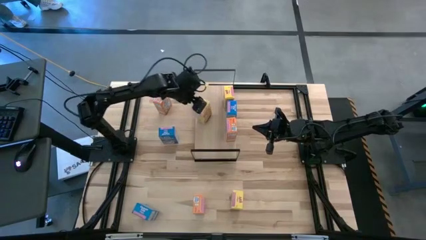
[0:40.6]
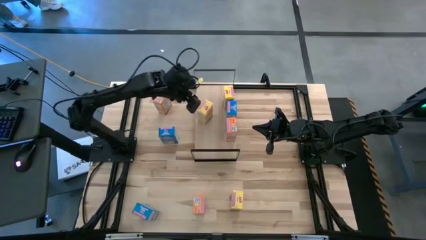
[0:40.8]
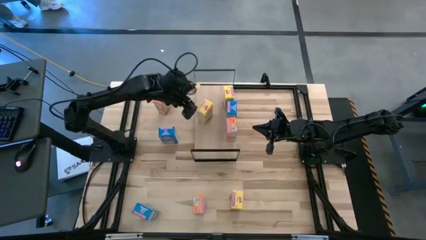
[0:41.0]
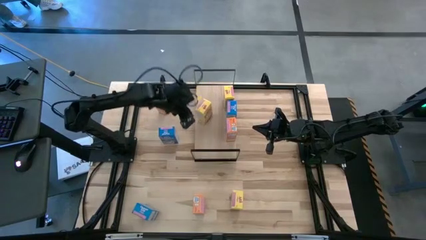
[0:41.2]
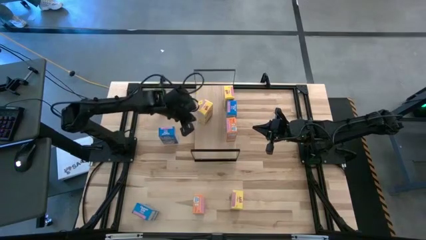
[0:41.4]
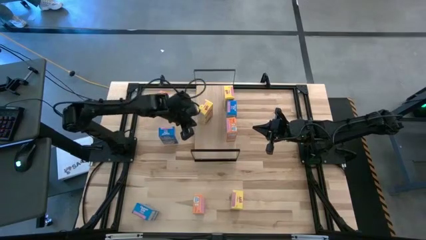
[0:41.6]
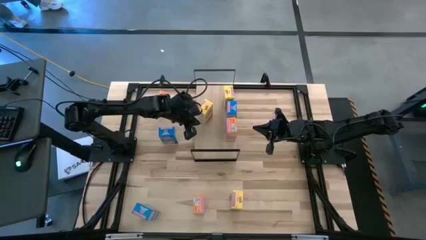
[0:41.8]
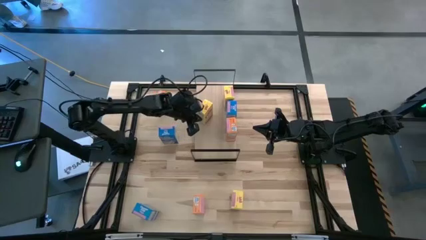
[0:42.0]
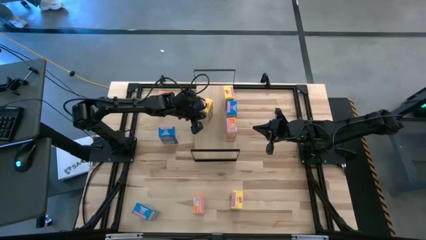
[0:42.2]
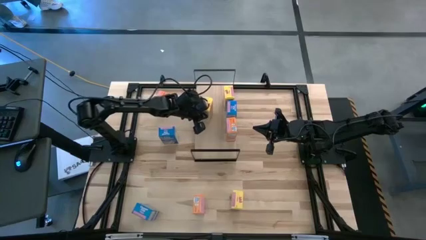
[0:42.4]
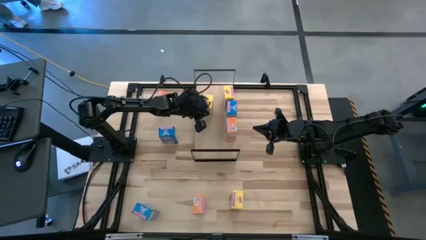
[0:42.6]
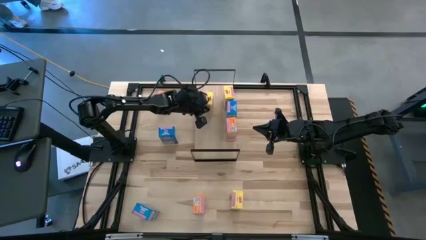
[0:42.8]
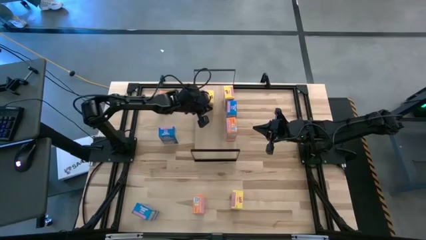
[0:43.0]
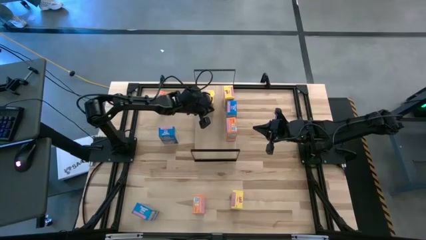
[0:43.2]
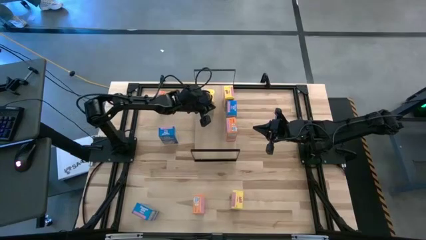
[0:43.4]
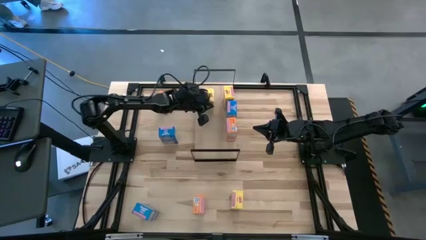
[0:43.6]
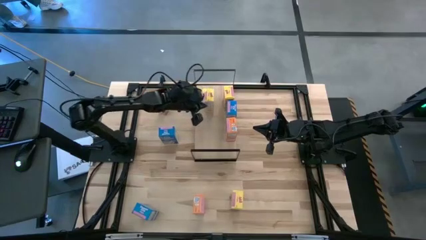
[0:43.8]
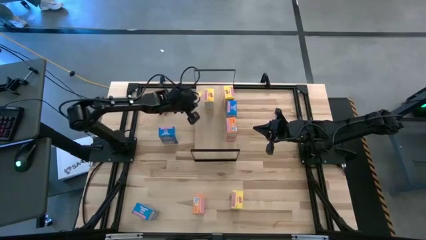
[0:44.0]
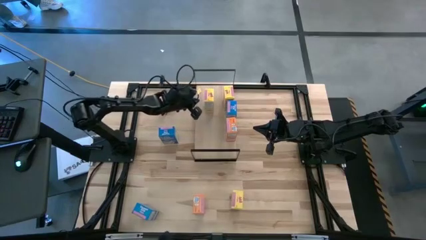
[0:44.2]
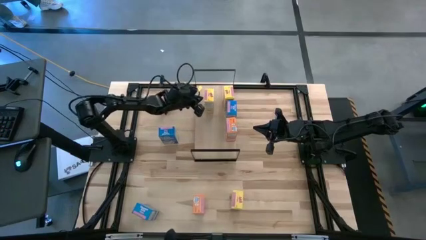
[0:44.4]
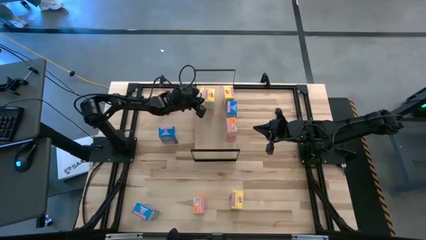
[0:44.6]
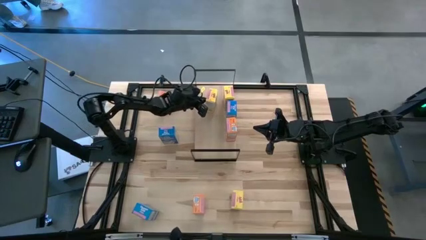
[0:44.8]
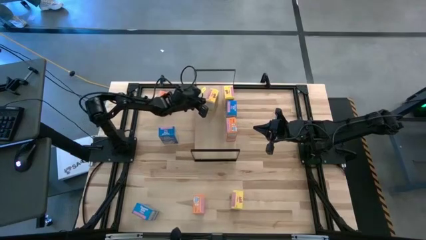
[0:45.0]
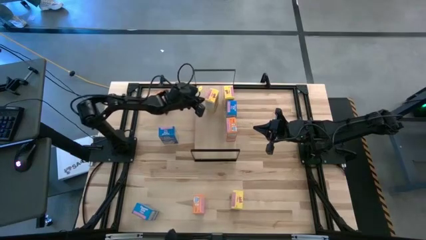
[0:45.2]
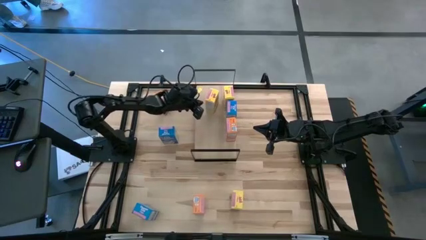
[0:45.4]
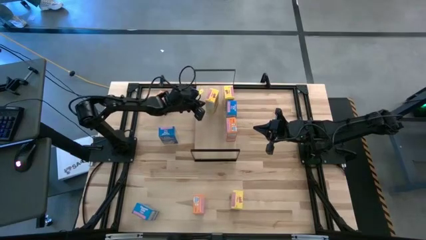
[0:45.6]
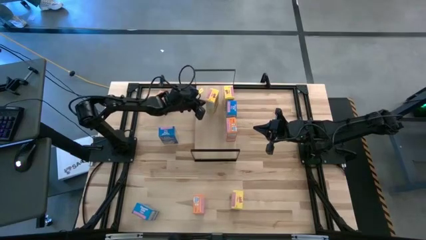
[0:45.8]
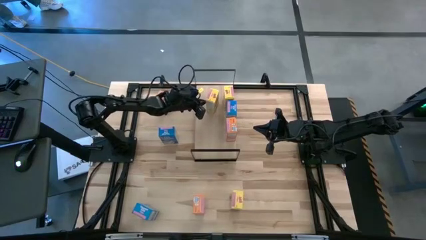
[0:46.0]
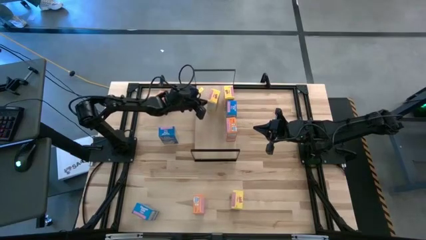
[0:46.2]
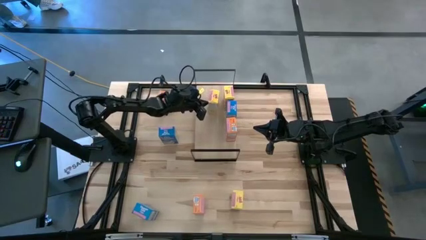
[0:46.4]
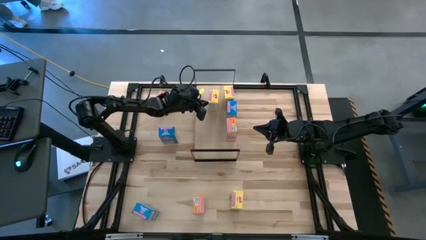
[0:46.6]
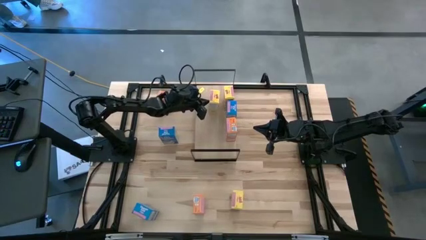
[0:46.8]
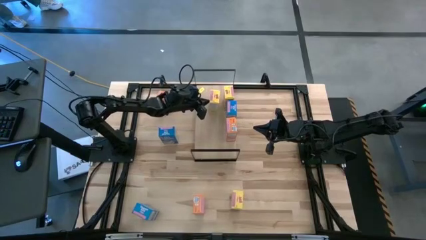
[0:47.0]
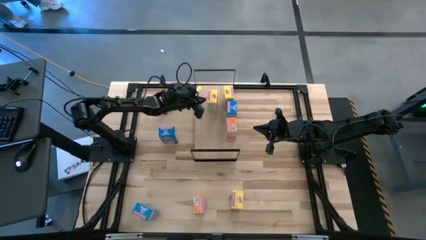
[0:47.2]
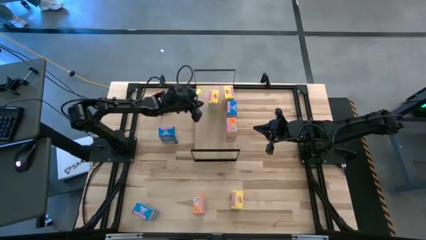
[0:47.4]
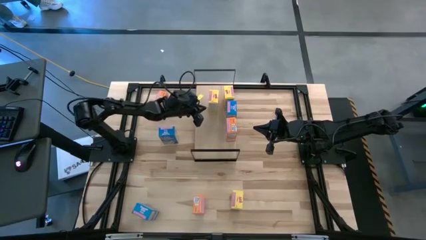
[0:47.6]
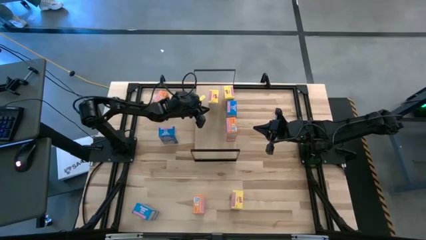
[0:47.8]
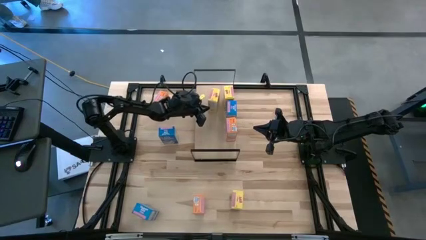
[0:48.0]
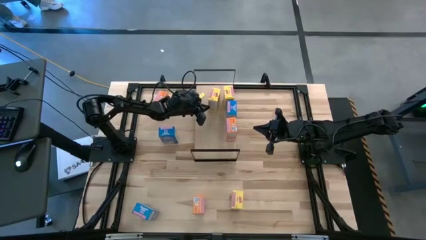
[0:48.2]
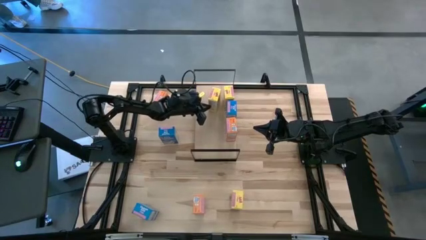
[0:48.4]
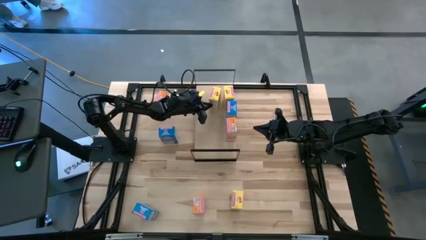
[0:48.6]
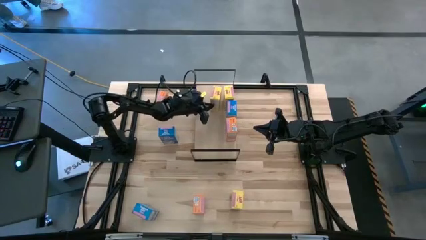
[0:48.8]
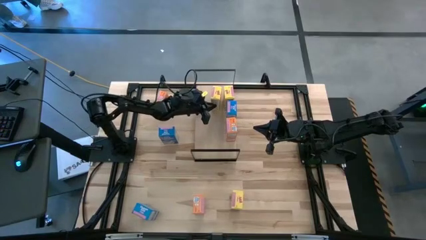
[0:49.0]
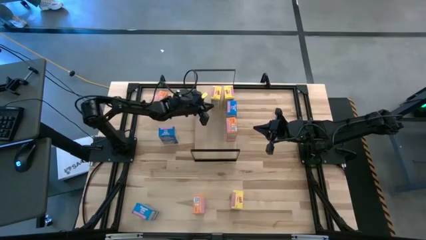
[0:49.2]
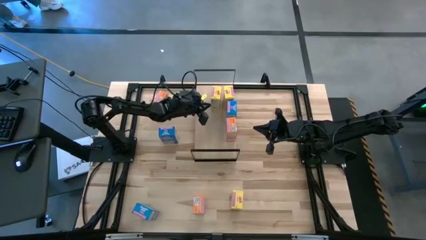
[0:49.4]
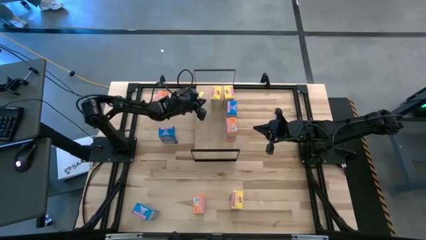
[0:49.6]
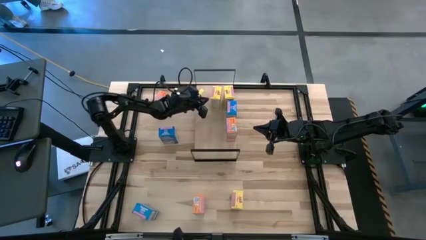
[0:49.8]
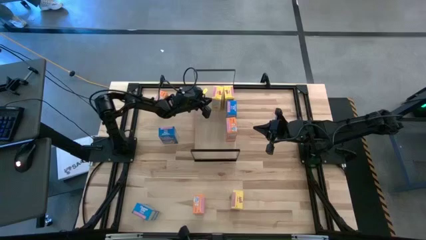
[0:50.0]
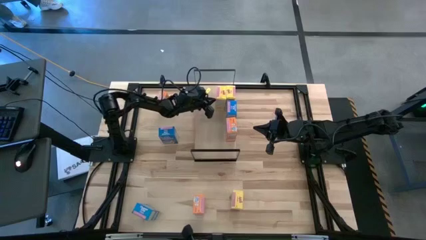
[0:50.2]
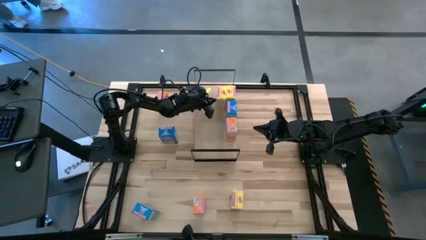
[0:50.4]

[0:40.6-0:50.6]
Task: Stack cereal on shelf
Put the left yellow cereal box on the shelf aligned with the other yellow cereal box on the shelf

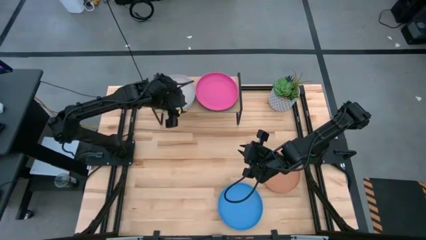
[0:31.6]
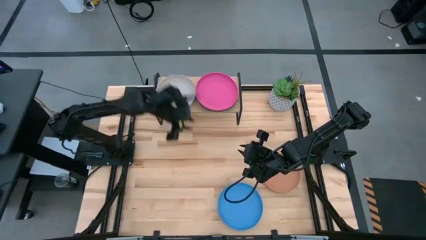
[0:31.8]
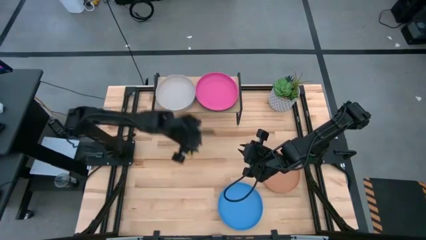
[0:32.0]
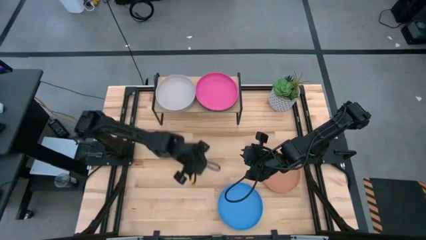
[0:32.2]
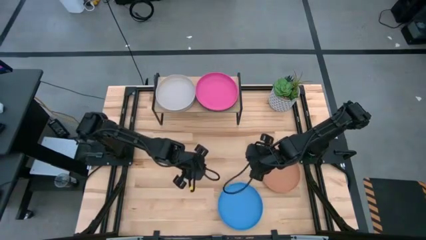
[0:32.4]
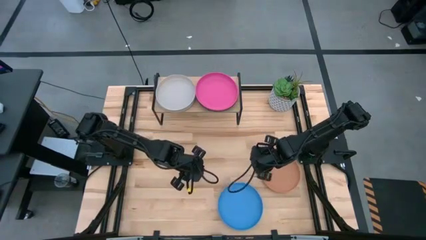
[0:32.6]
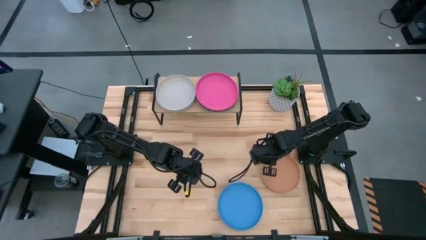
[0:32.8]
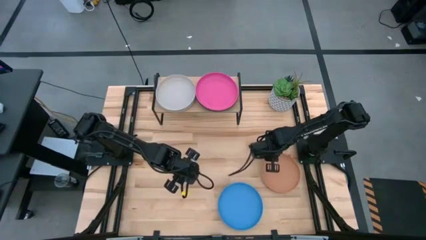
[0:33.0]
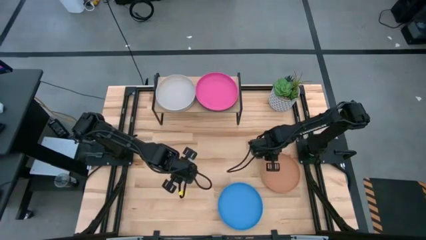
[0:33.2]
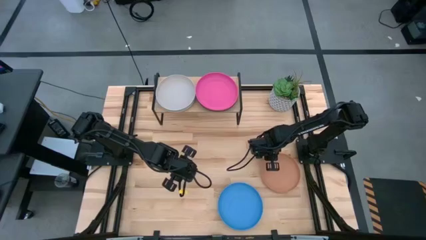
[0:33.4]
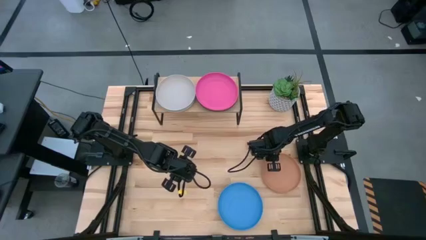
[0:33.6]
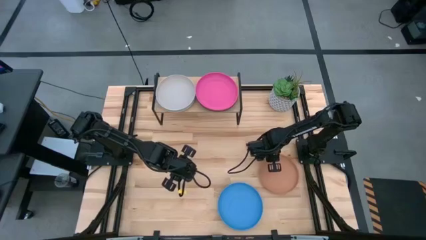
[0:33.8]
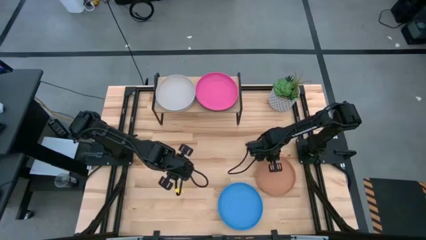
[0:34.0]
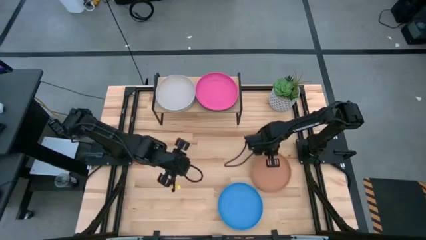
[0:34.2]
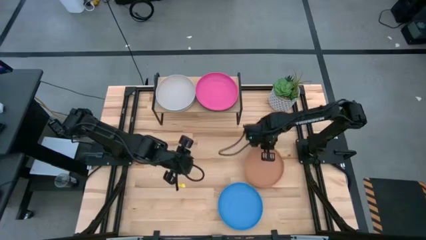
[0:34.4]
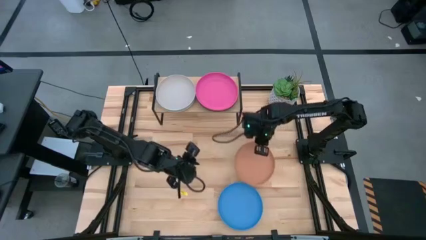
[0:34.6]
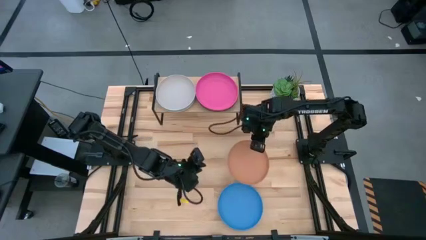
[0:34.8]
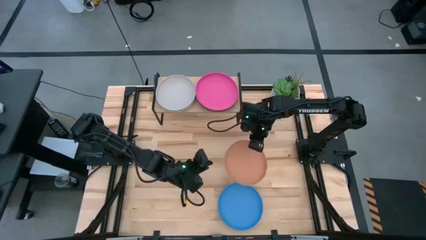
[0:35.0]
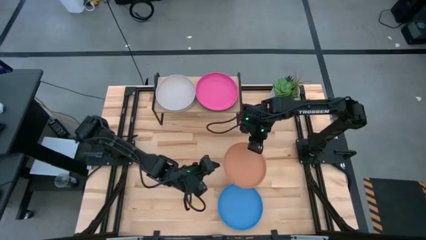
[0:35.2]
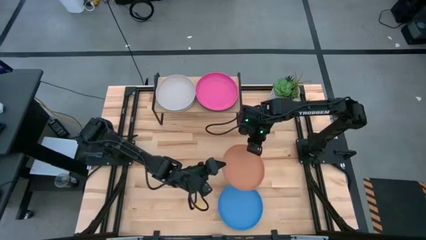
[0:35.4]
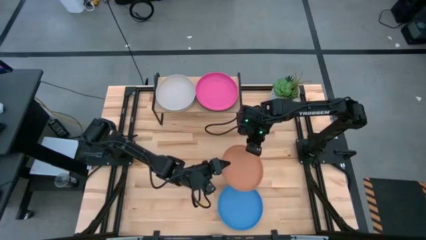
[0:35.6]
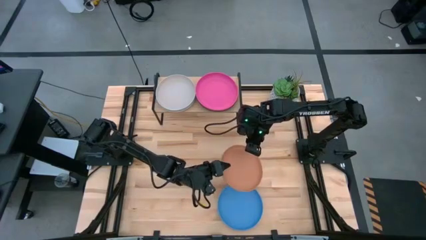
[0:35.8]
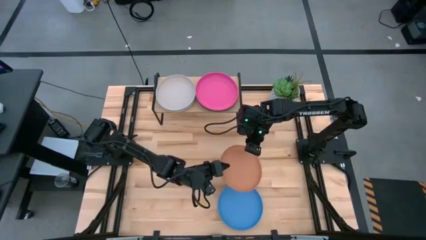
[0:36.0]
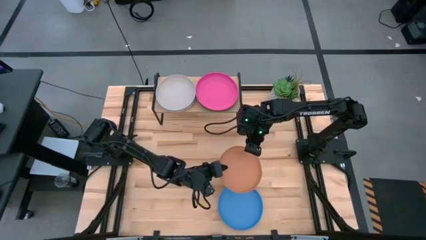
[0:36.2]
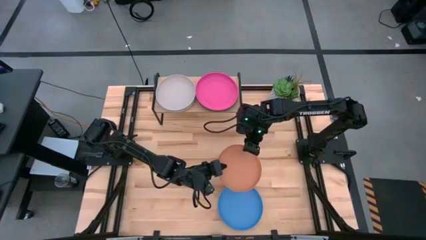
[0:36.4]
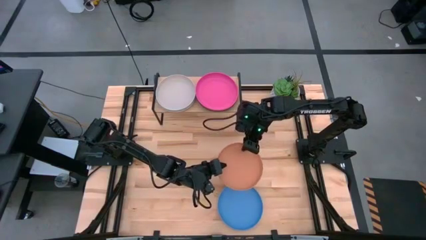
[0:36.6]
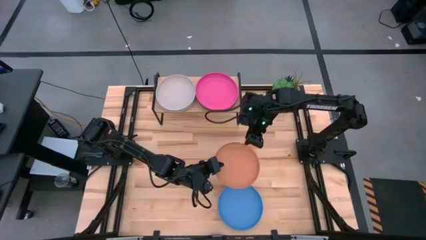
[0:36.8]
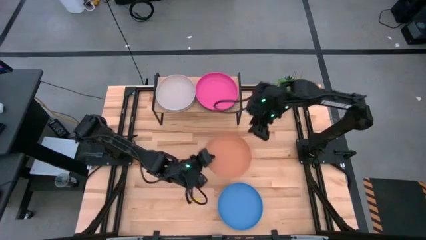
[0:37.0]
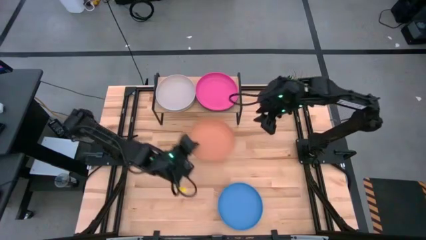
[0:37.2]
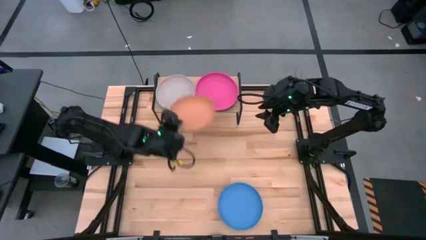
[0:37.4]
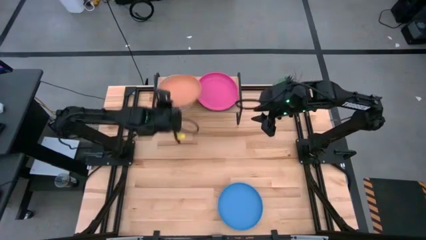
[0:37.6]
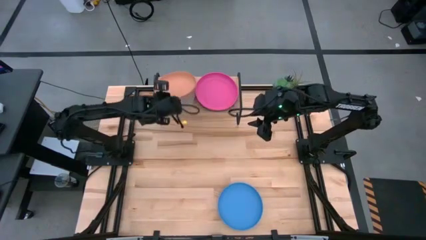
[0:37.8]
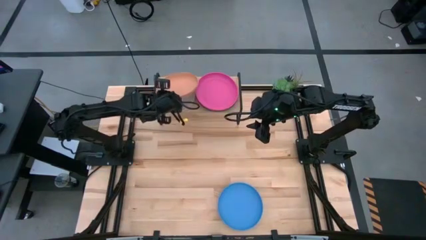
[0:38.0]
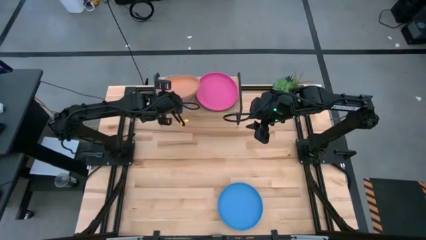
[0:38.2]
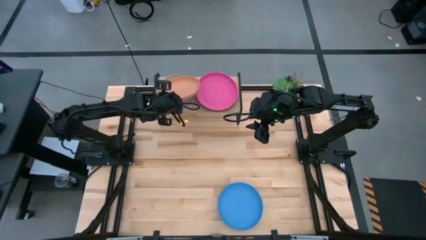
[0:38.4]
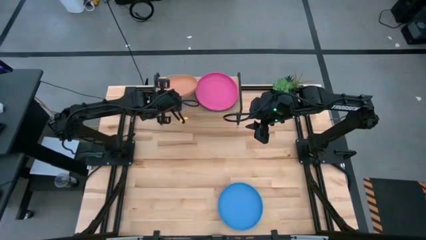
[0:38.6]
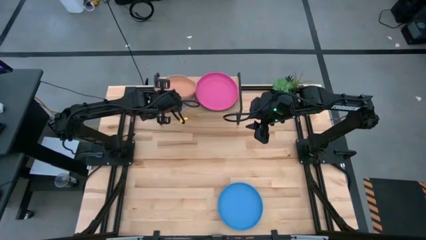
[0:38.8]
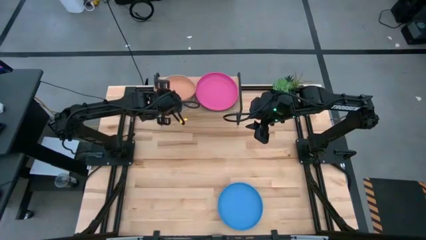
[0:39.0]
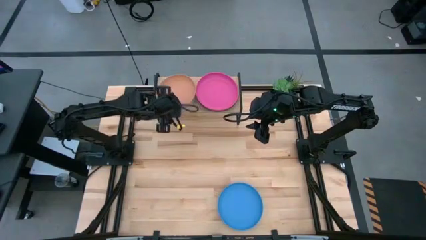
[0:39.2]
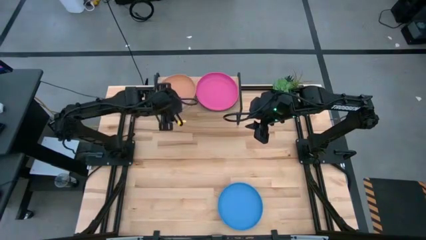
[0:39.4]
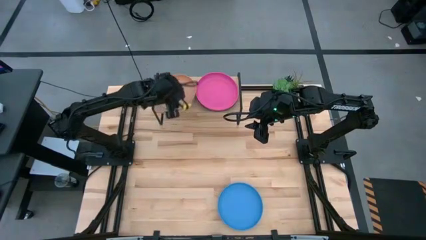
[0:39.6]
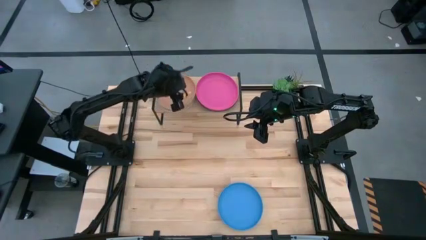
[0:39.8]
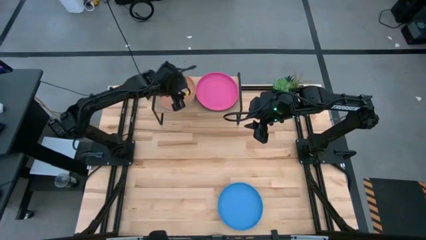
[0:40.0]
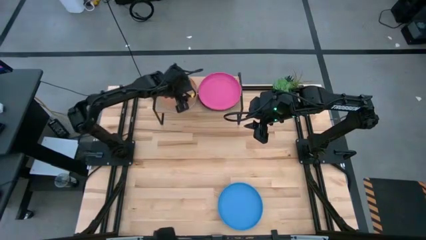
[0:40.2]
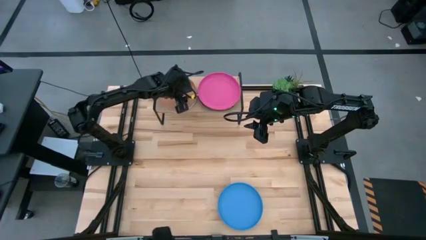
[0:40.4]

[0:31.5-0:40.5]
Task: Place and stack plates onto a shelf
Stack the brown plate on top of the gray plate on the shelf
